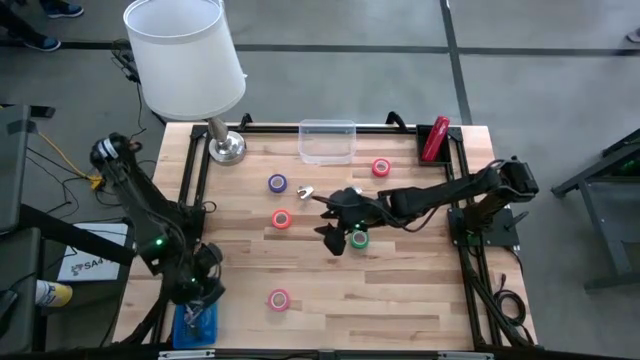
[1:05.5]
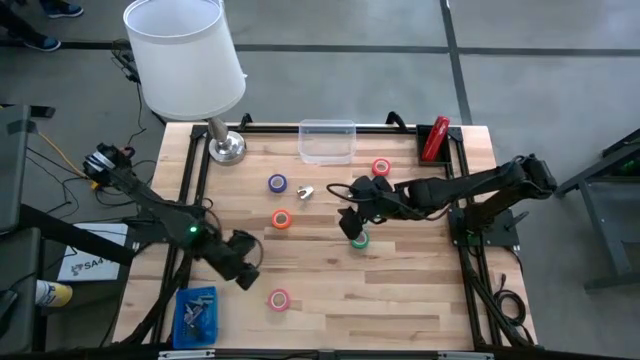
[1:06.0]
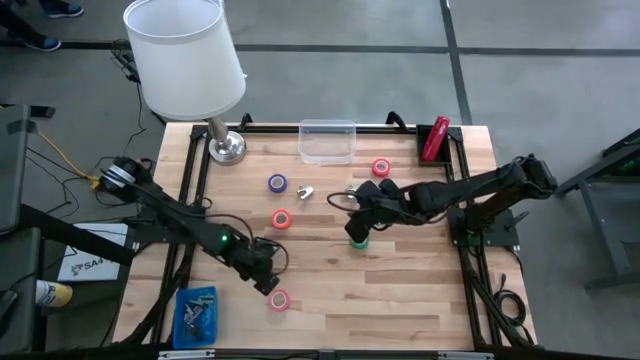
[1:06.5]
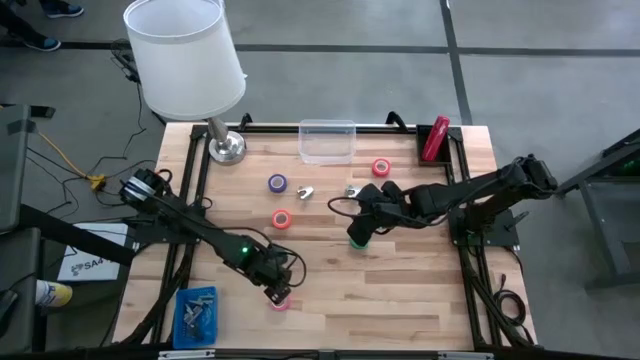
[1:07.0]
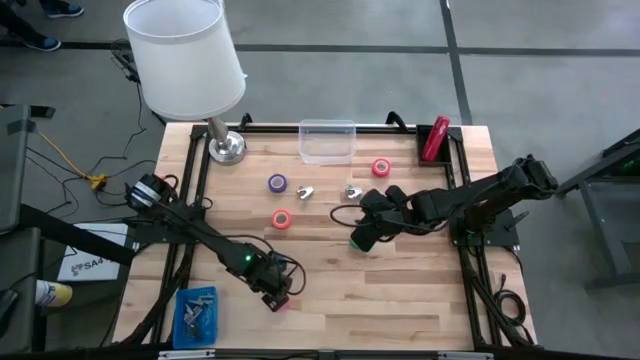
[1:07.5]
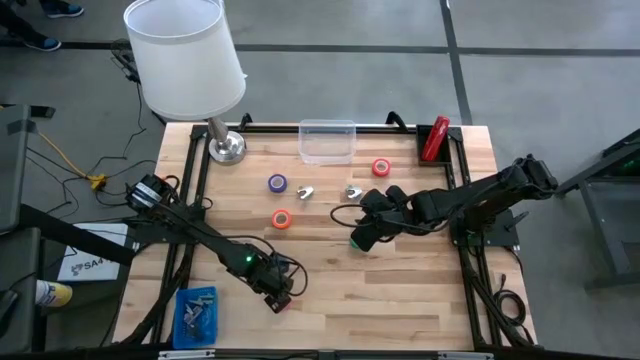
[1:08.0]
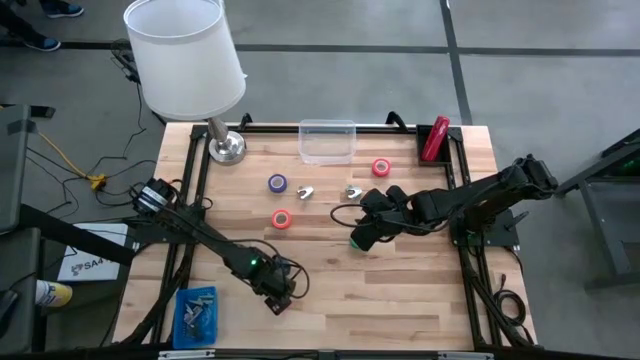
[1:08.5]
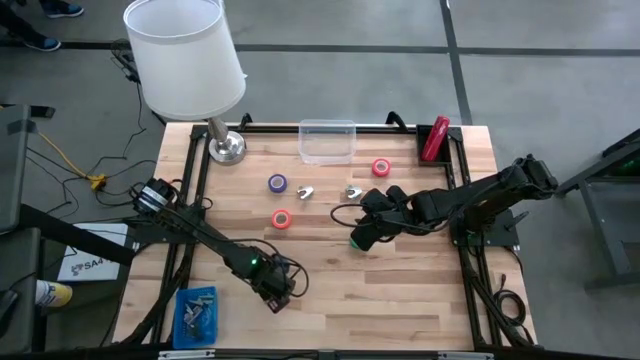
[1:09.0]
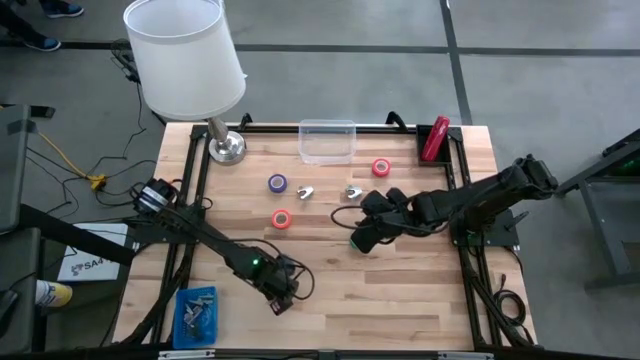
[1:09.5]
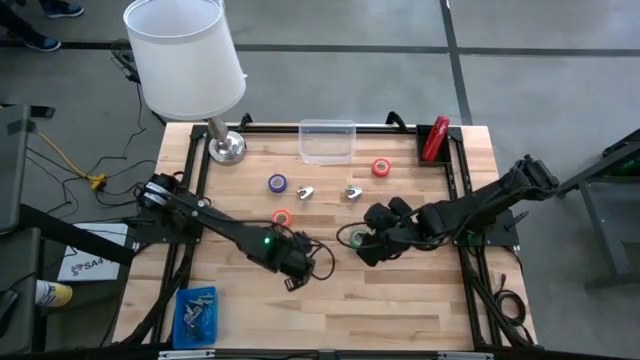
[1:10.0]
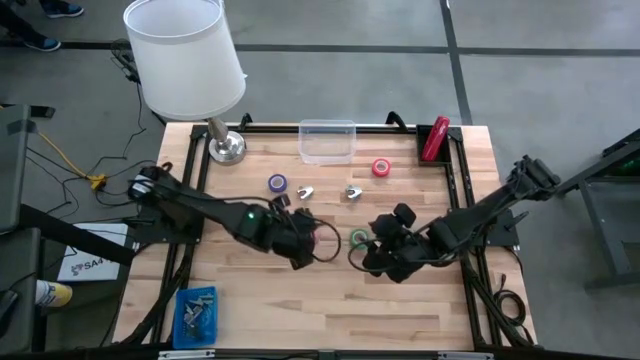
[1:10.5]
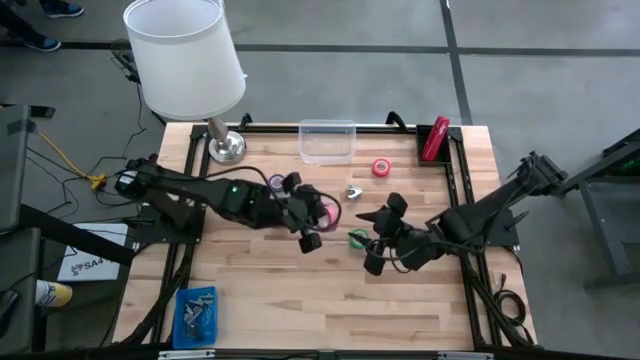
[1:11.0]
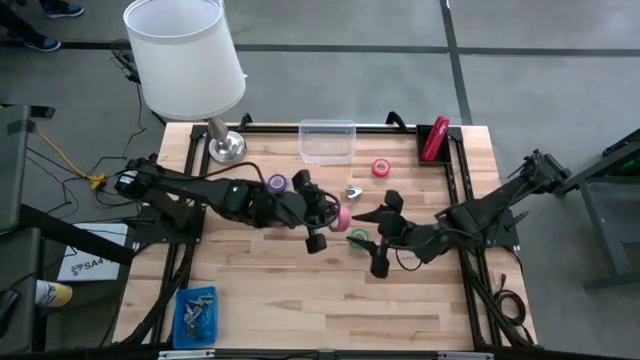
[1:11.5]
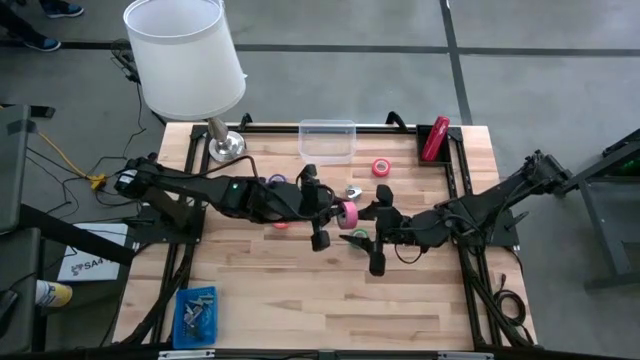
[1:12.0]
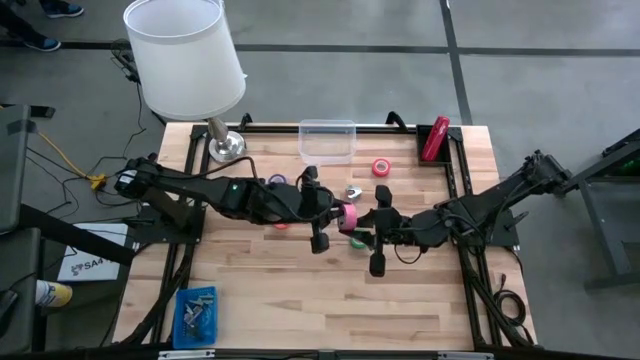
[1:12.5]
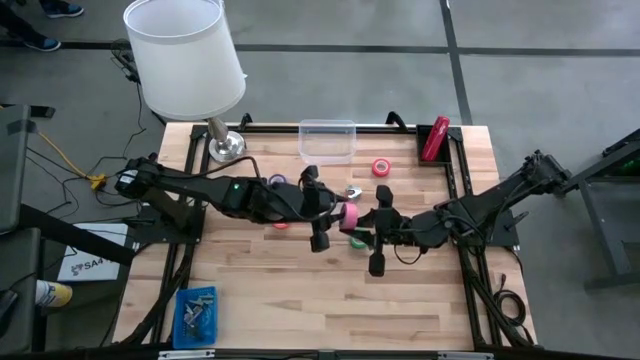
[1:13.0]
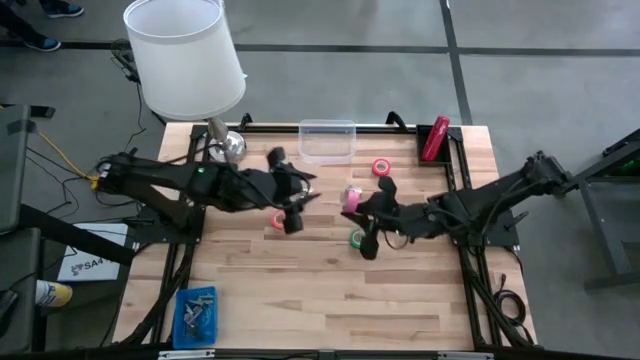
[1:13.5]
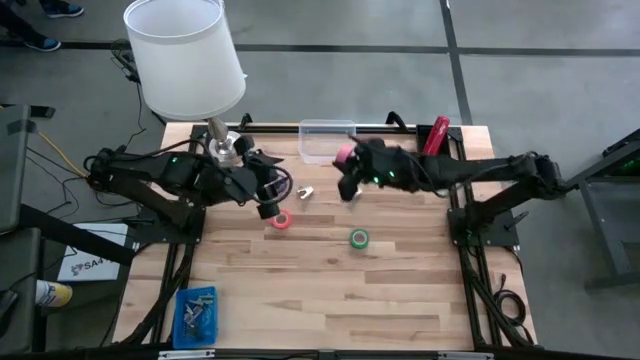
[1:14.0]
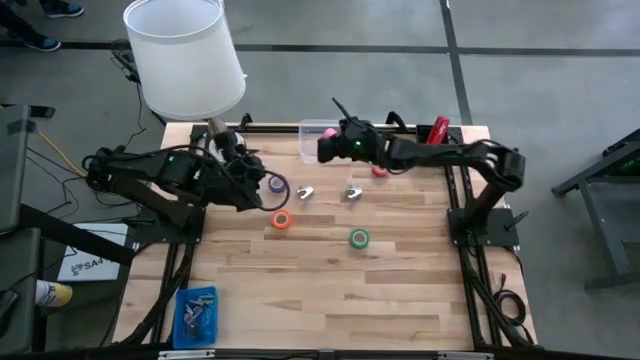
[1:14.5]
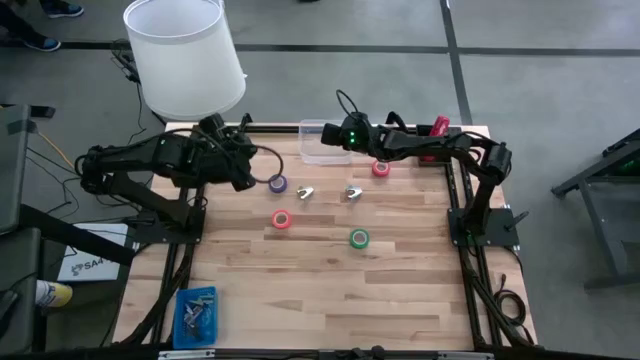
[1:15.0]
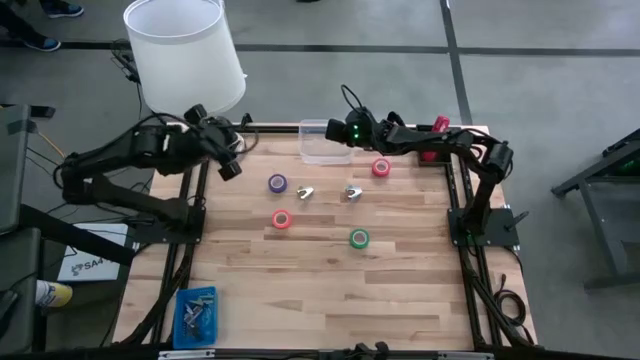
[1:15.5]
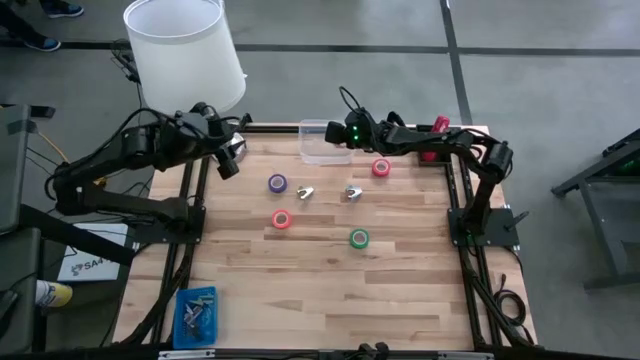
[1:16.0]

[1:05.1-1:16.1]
Task: Pick and place Stapler, Stapler remover, tape
Put the pink tape into the transparent bin

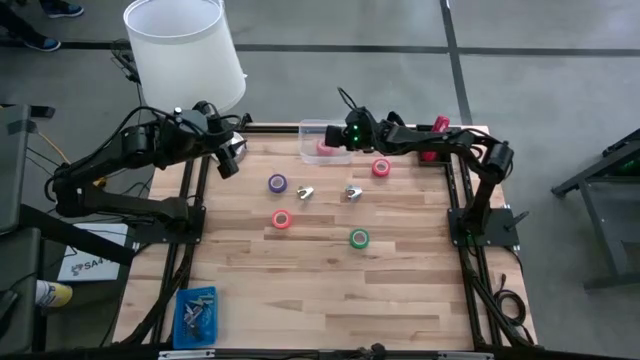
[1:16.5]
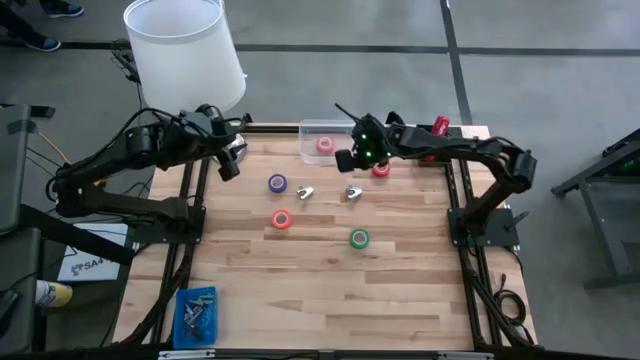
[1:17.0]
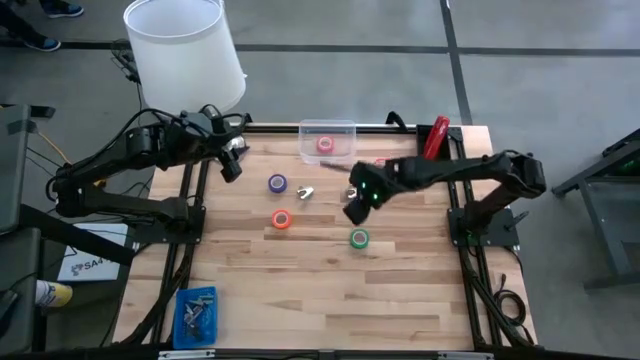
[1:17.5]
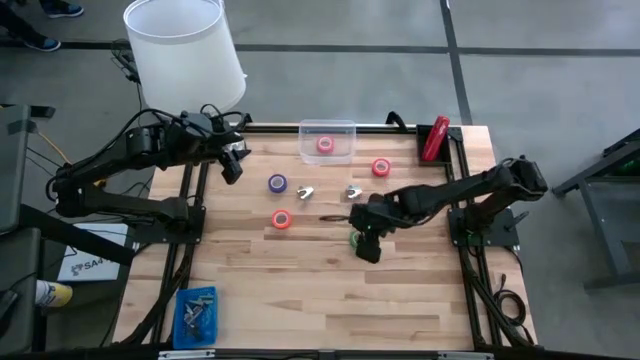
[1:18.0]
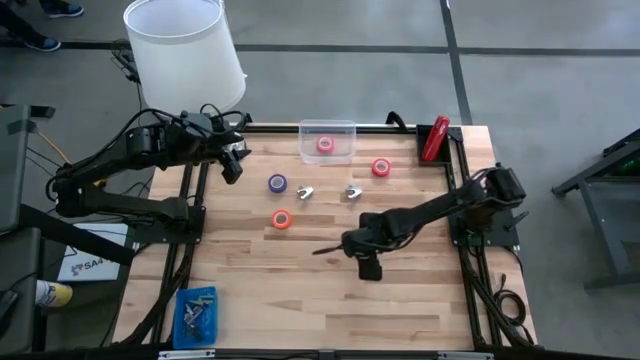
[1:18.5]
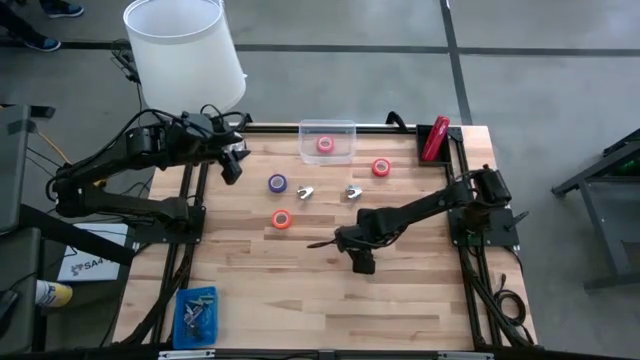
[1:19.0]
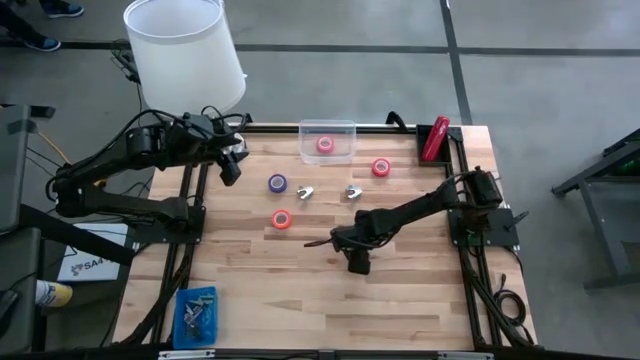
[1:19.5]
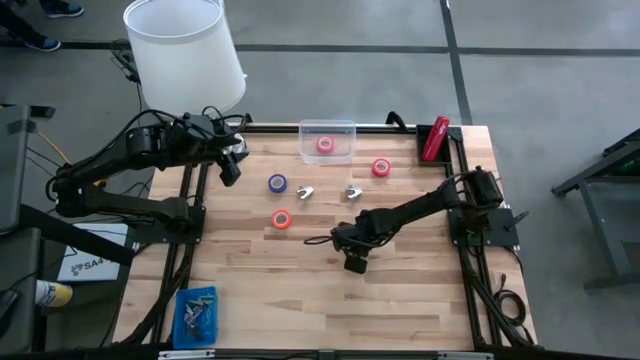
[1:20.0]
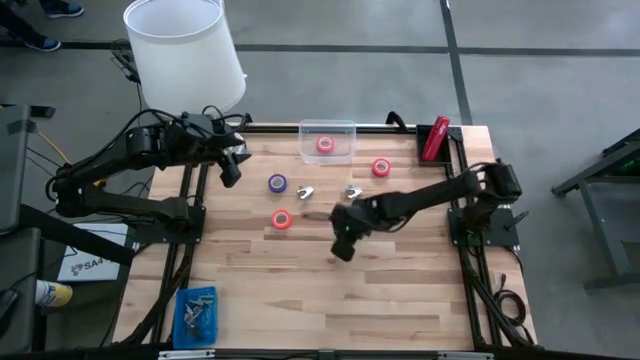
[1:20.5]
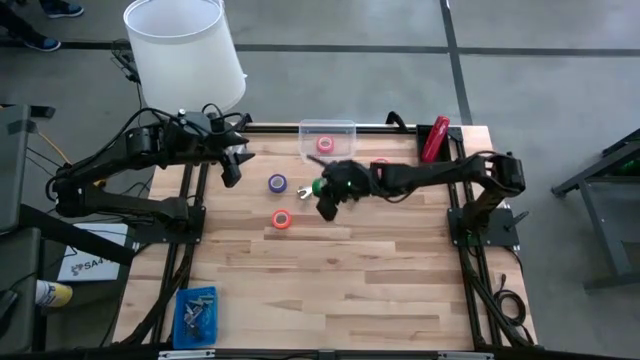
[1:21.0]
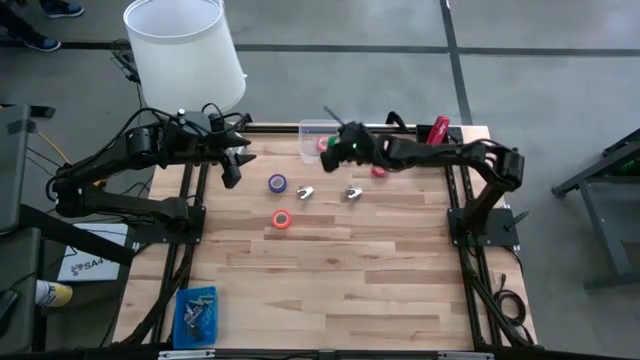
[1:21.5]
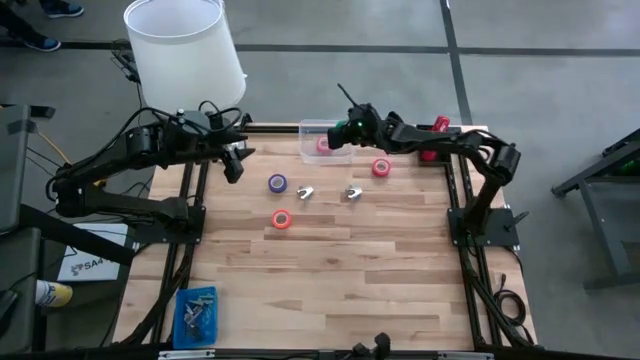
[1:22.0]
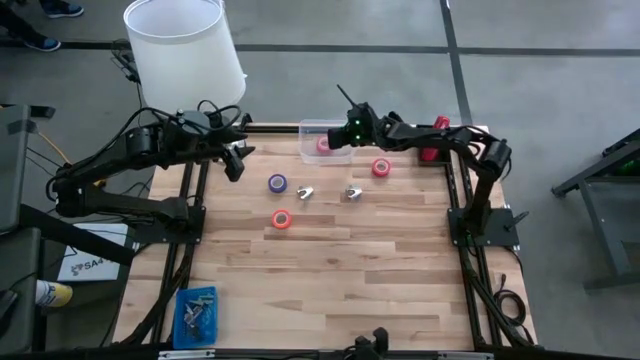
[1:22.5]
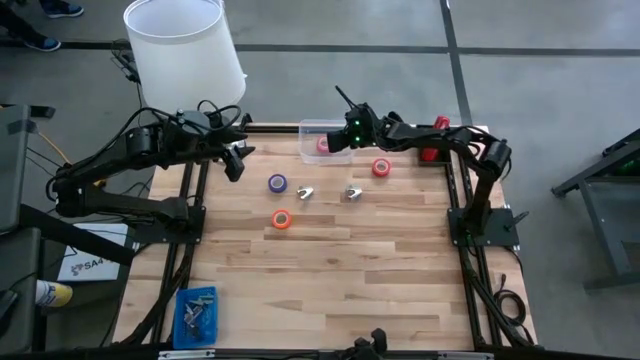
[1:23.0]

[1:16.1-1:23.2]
Put the green tape into the transparent bin

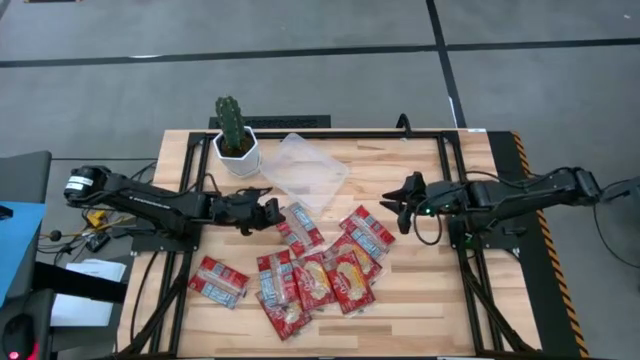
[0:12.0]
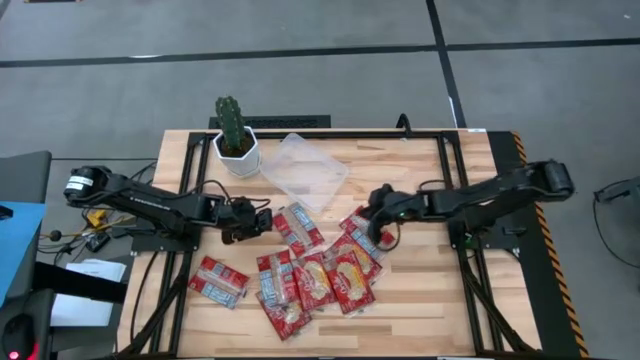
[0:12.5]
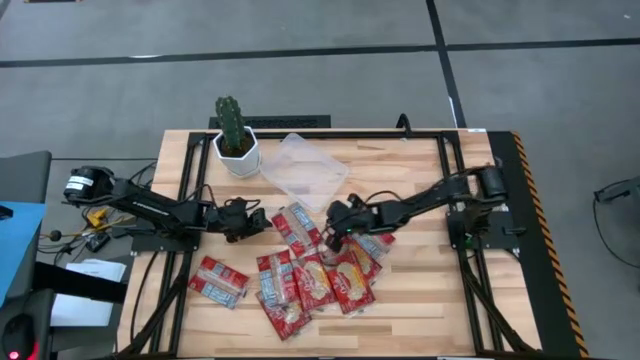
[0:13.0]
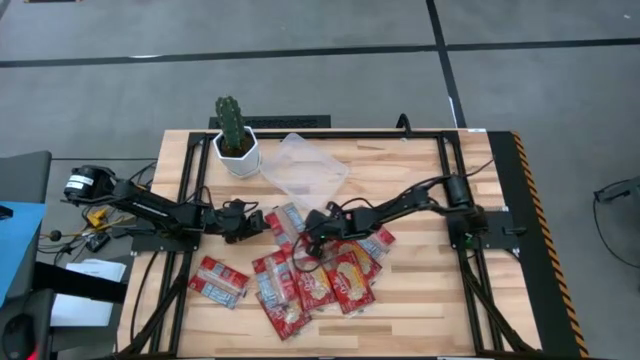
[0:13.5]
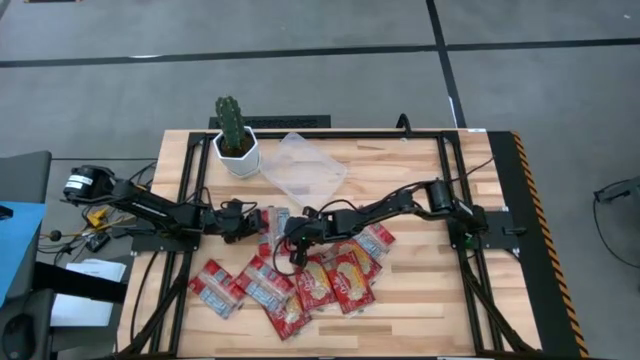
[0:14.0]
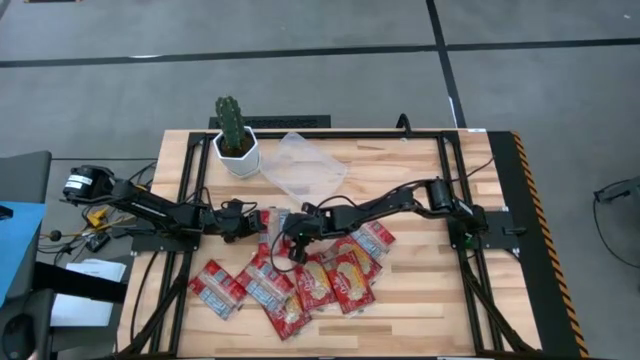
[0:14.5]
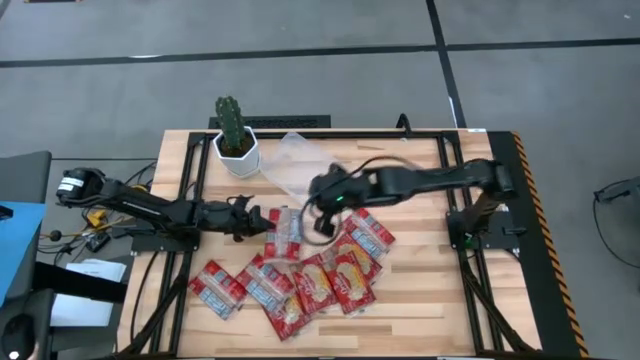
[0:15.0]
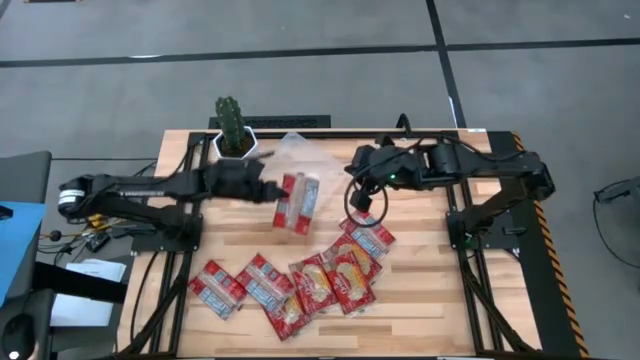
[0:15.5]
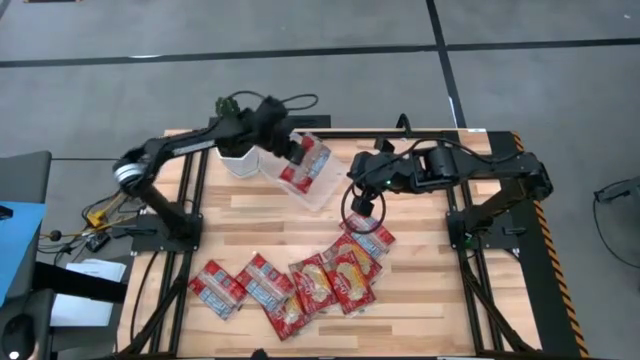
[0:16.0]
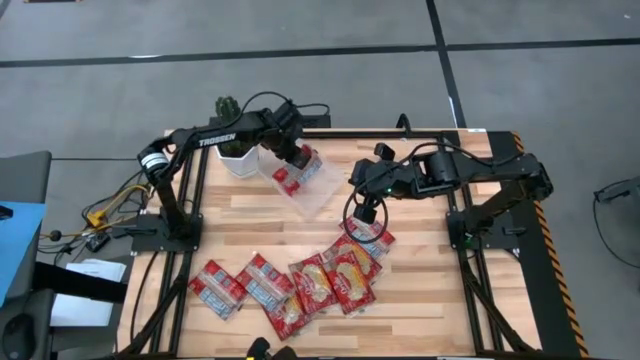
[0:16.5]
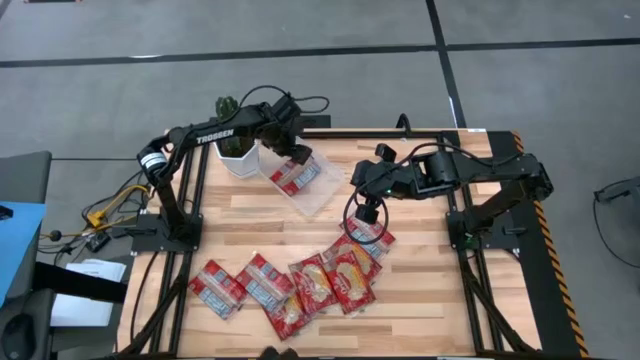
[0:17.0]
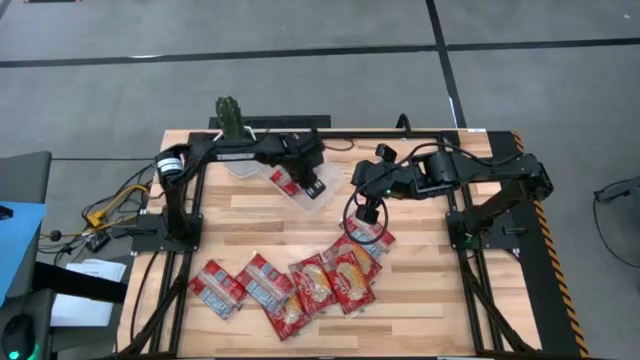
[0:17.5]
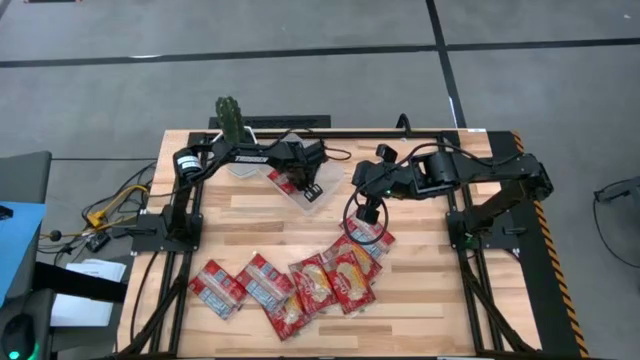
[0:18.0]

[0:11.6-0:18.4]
Task: Sort popcorn bags into baskets
Put the red popcorn bag into the transparent bin
